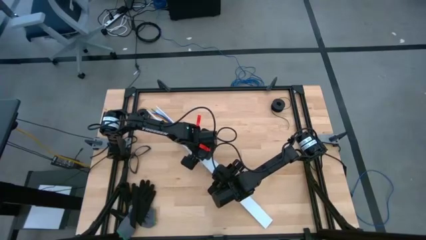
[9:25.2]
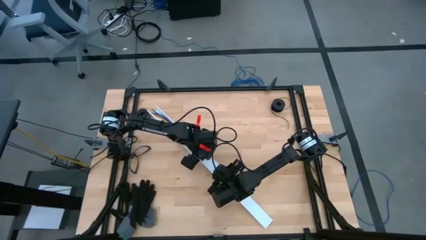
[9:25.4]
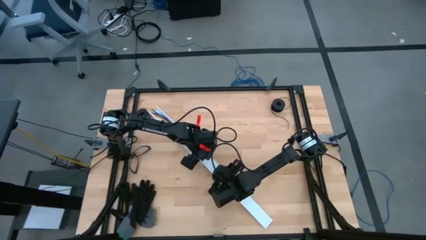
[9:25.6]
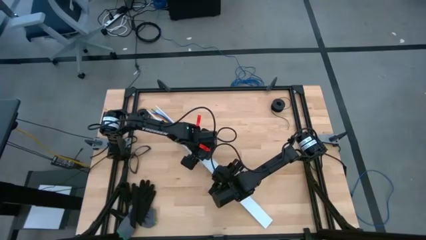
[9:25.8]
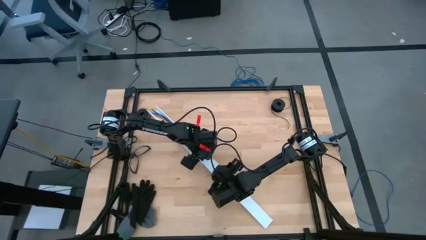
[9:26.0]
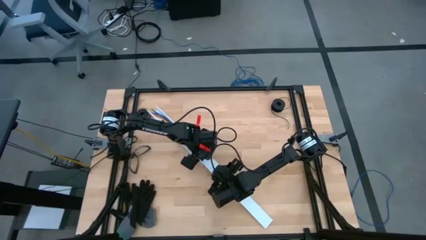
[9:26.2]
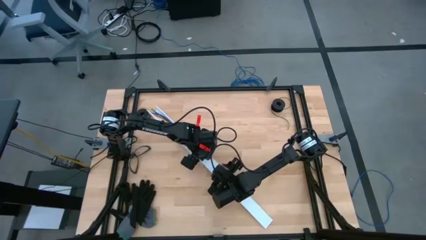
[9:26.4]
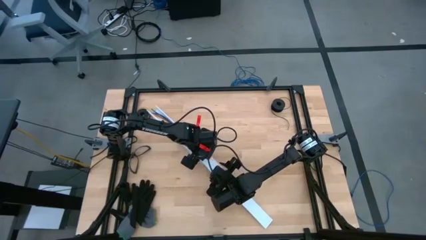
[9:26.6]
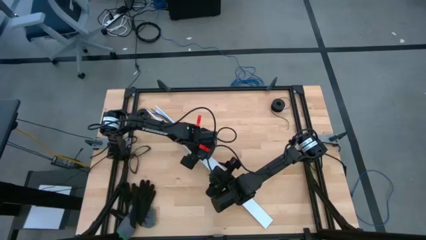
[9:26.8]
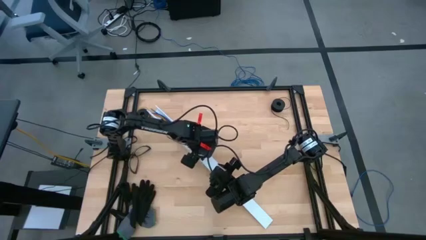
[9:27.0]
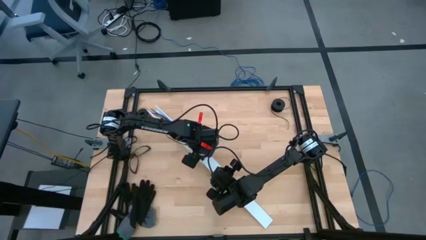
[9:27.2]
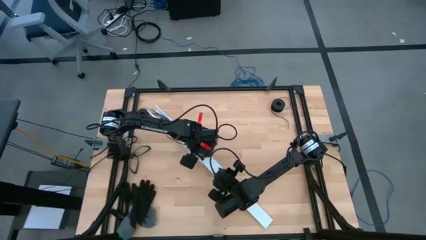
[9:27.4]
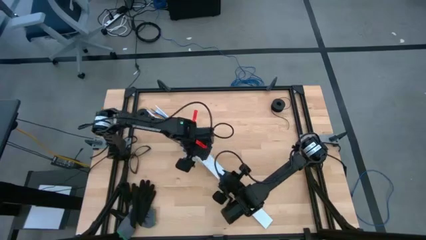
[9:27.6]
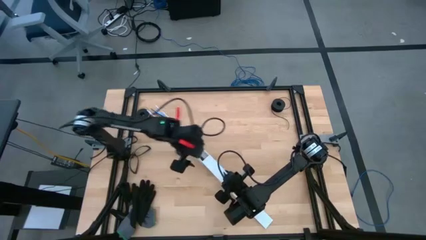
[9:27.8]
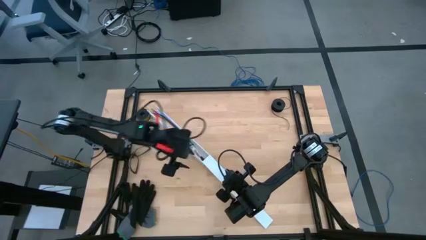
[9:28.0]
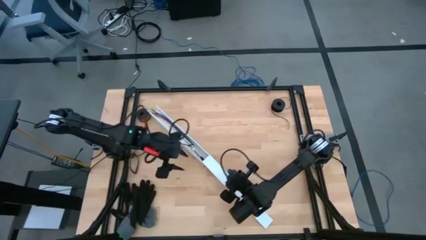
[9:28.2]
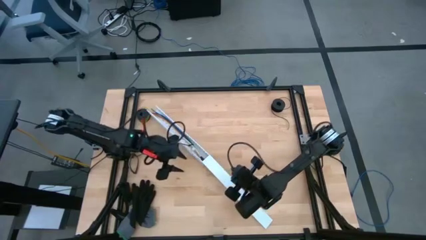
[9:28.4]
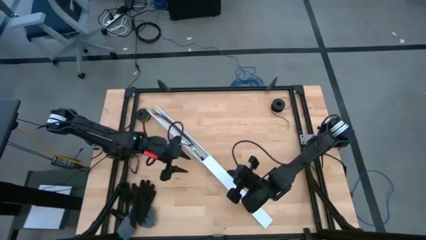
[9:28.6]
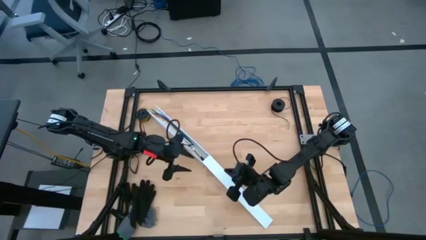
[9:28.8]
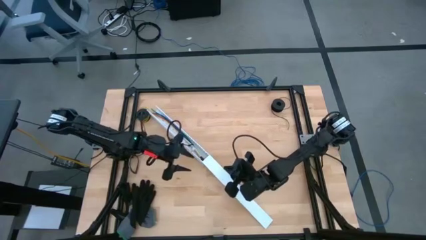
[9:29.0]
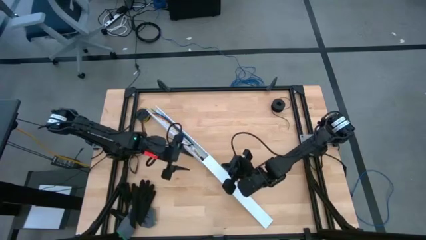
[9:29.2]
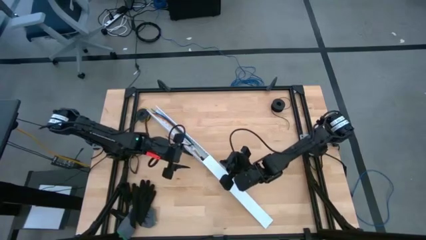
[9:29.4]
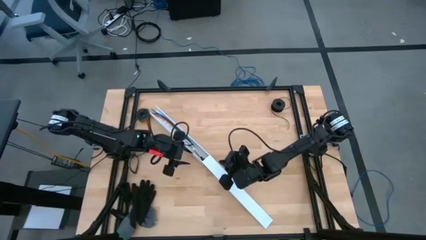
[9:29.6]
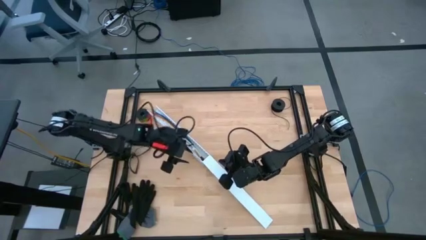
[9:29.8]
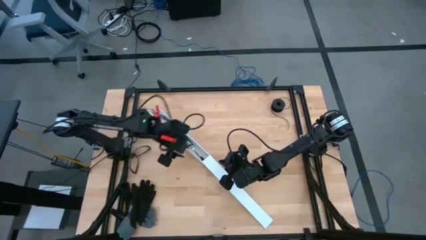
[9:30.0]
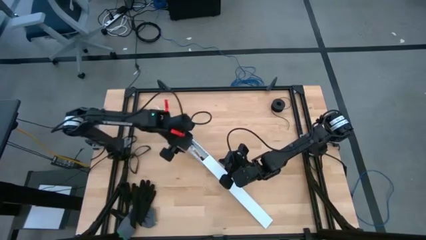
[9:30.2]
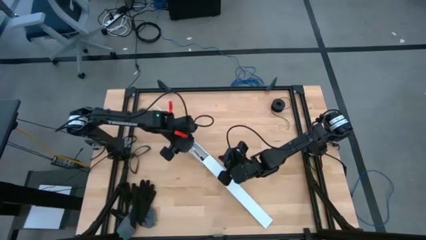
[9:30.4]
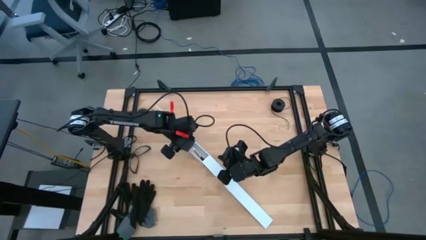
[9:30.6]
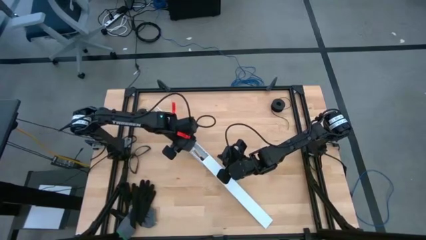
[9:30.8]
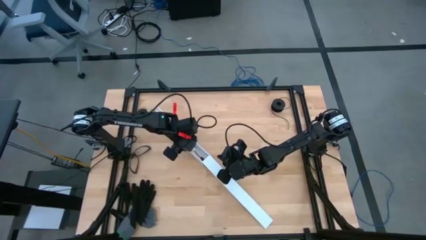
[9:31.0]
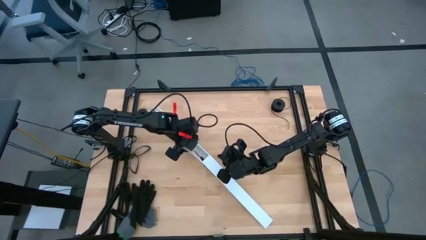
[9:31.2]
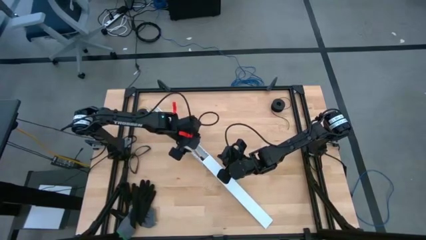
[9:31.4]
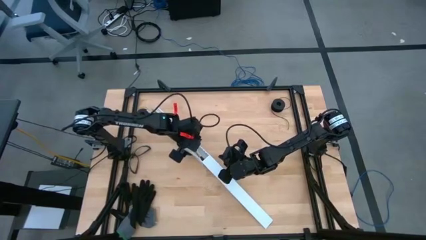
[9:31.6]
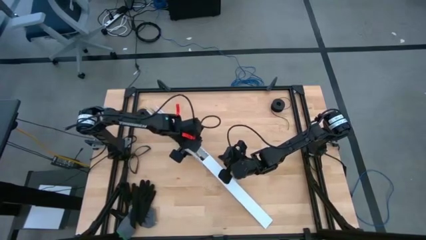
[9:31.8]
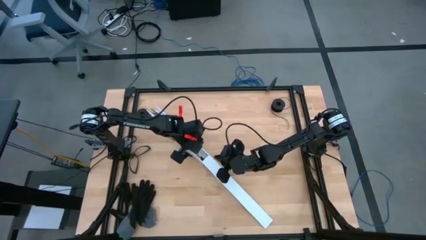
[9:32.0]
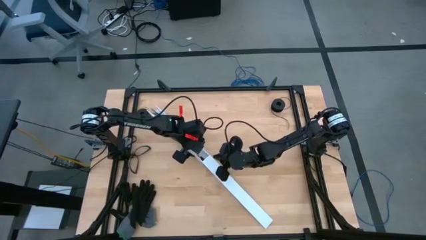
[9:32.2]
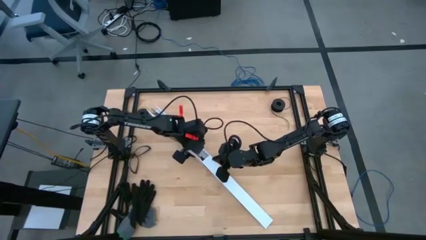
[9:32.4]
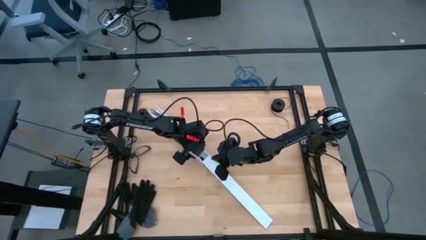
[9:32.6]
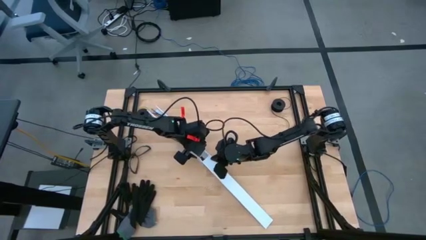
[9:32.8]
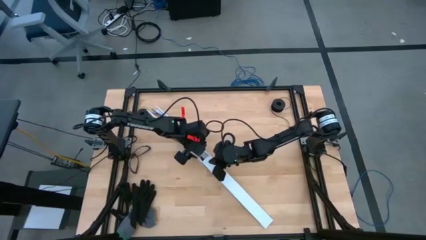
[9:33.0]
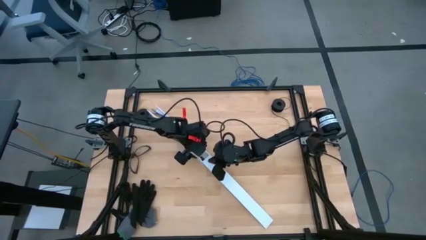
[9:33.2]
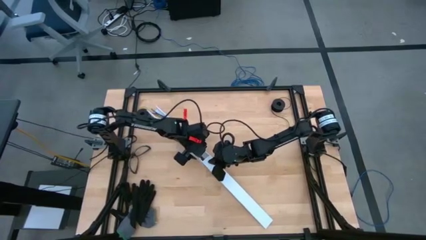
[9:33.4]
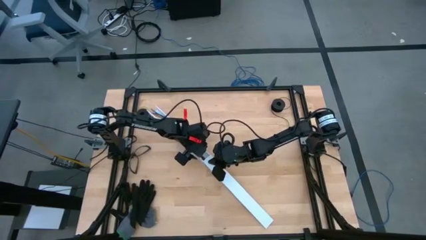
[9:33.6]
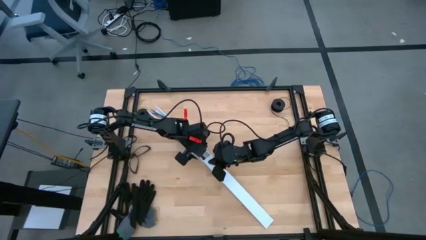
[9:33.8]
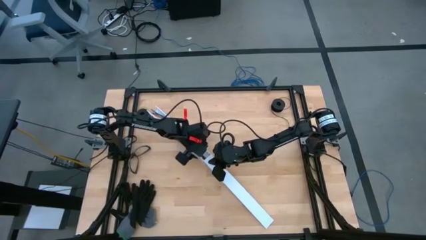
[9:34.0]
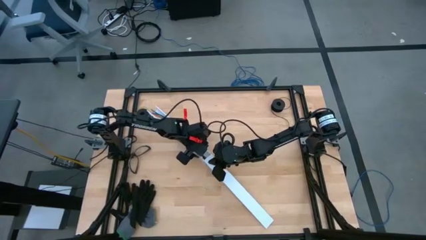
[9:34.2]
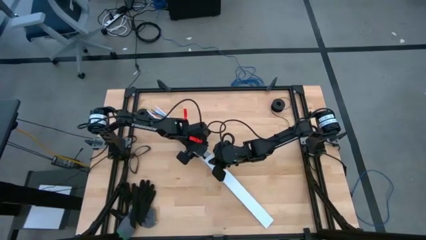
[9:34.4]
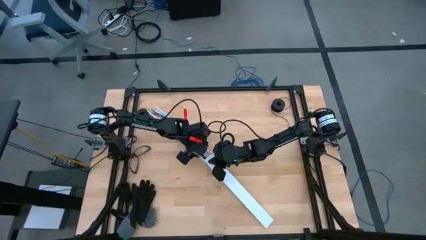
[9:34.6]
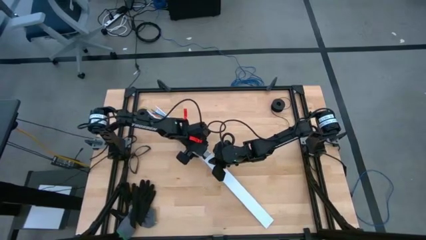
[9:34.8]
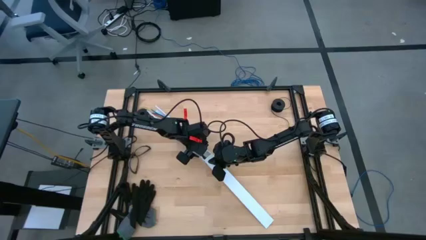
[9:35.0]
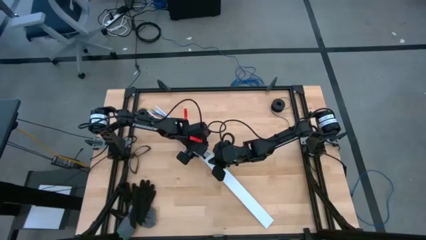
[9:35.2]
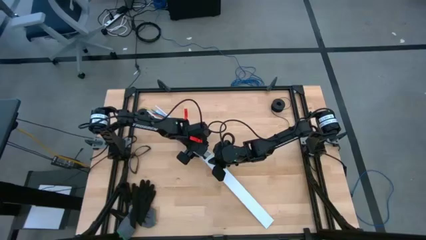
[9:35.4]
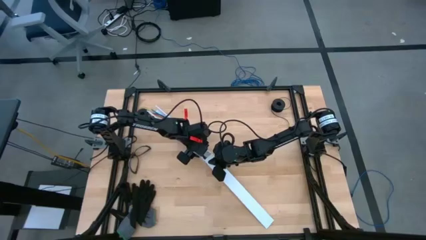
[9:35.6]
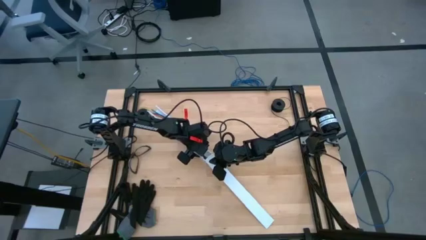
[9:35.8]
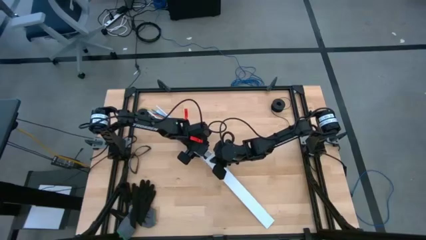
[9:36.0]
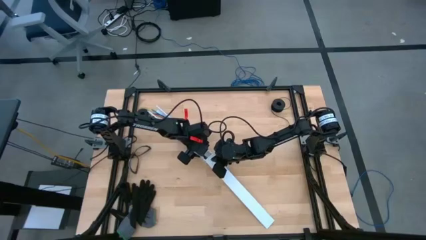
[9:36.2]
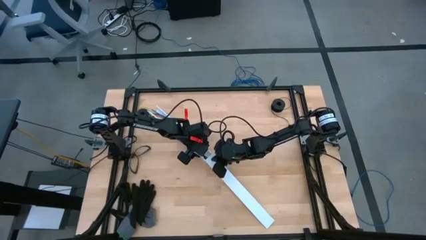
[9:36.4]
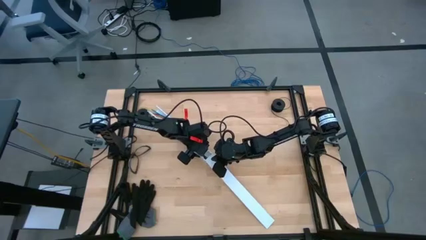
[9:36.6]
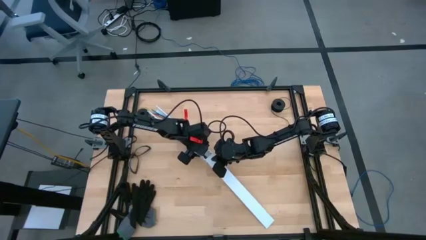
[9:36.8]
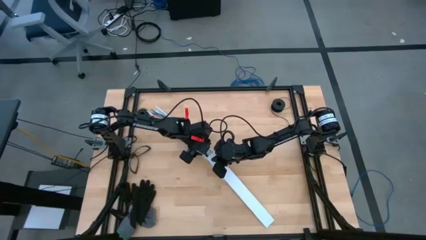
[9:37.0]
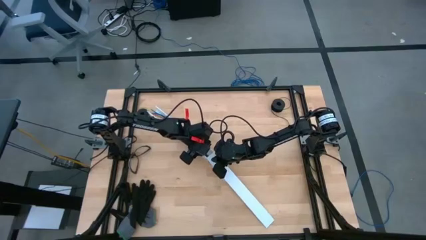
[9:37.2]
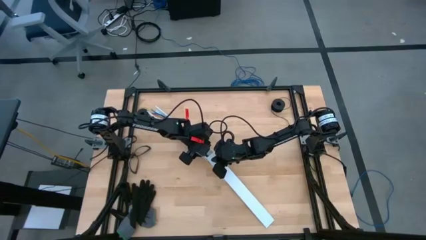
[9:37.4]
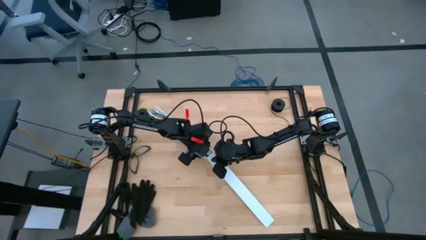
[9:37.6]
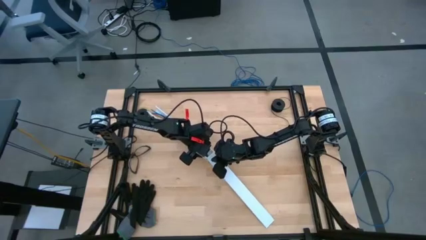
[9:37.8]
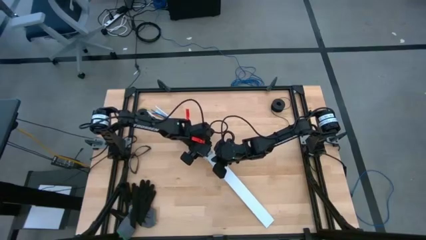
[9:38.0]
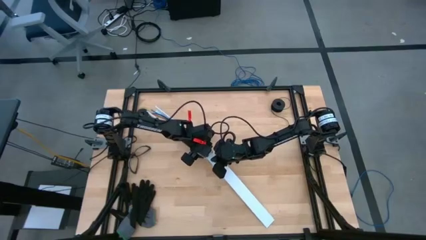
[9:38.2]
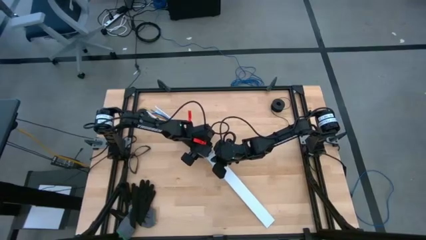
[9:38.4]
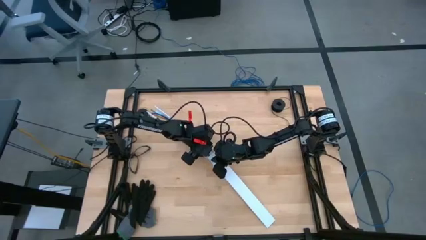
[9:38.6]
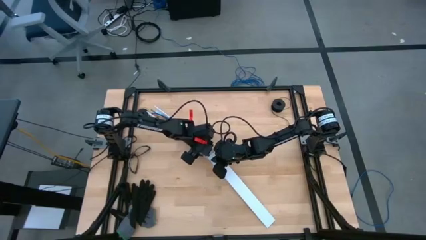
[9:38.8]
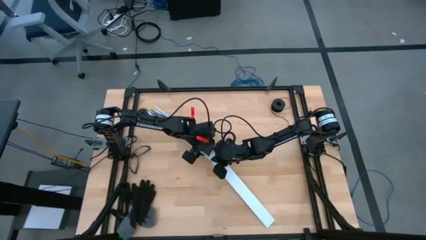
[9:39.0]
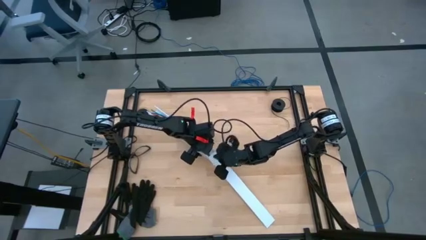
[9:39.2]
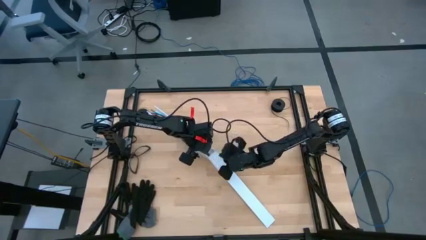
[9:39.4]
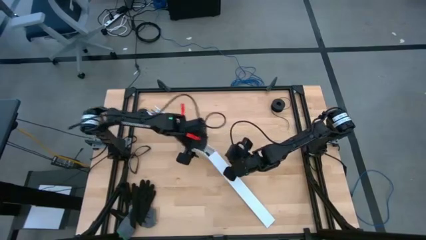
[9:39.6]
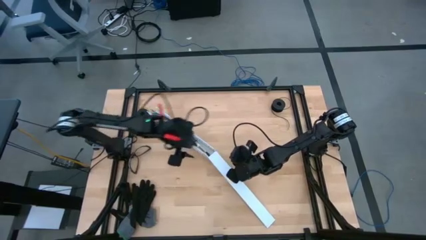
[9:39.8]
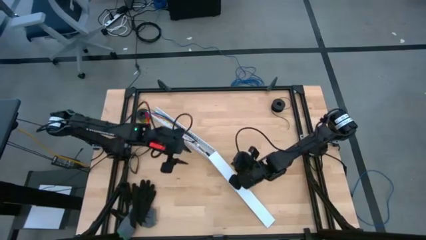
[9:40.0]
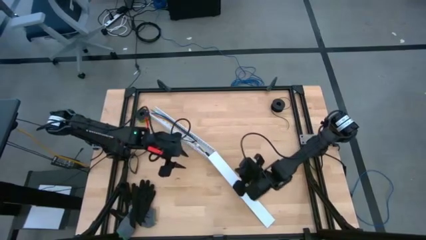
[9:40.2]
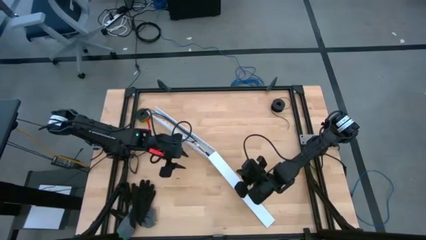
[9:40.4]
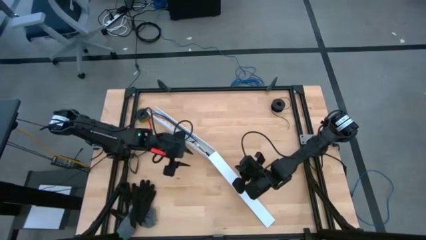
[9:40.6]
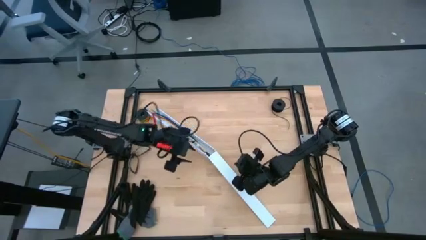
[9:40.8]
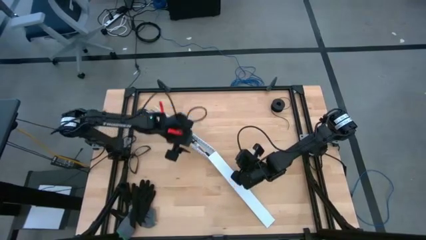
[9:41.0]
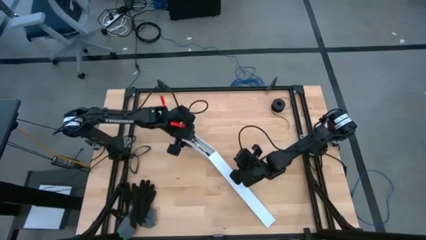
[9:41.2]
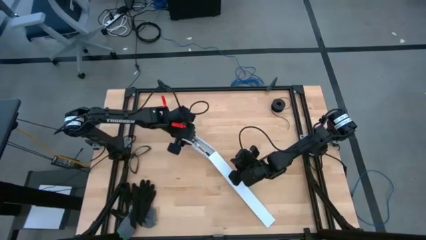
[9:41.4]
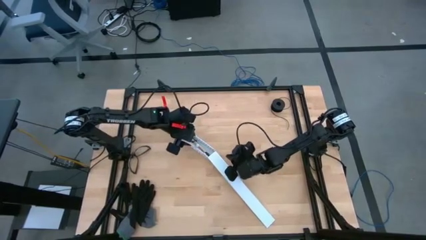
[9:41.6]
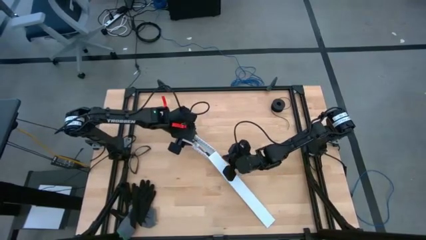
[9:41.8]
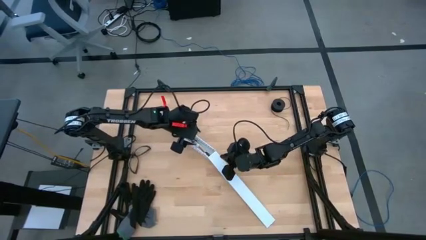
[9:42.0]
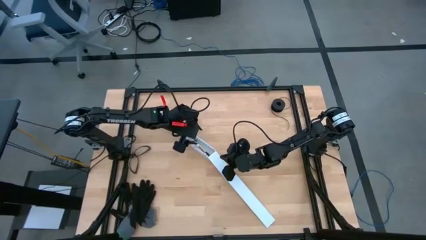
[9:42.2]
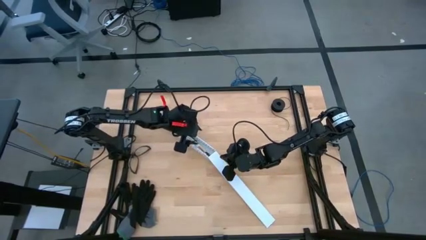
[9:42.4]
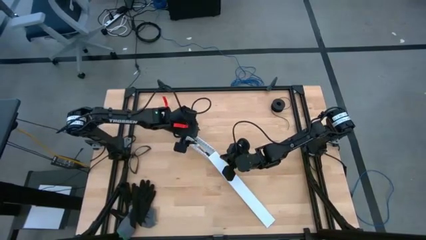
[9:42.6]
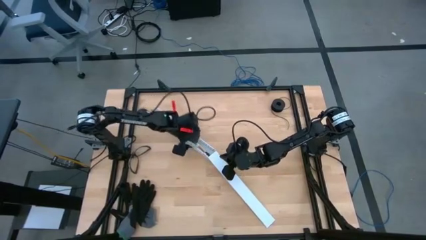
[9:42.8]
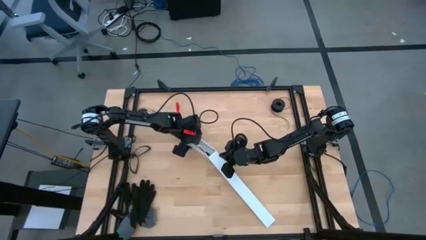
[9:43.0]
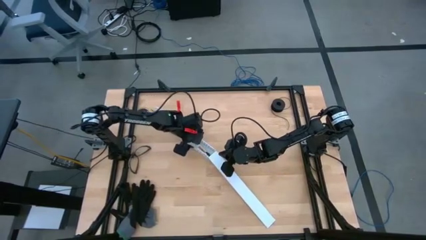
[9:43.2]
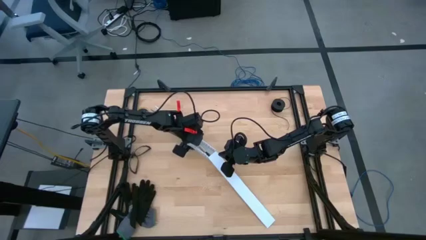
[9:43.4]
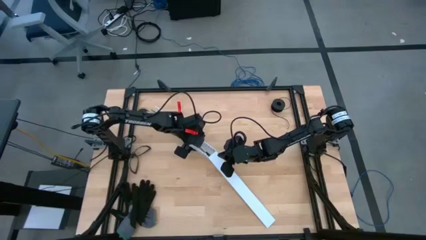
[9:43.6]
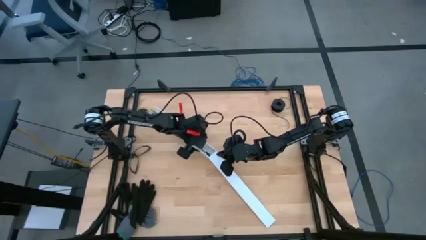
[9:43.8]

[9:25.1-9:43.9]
Task: Ziptie cables
Close the white cable duct
